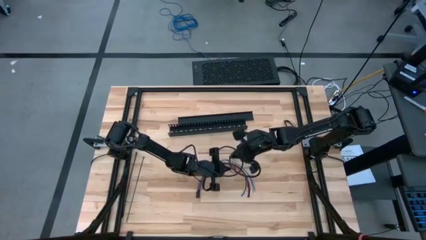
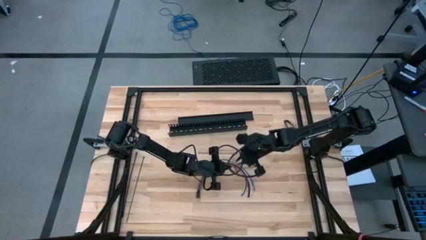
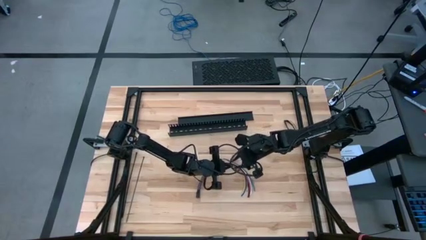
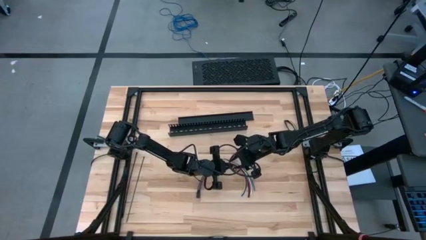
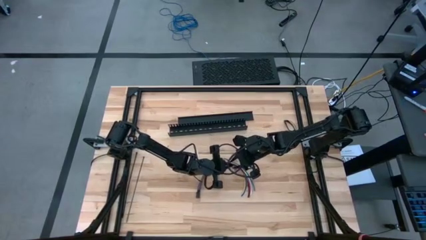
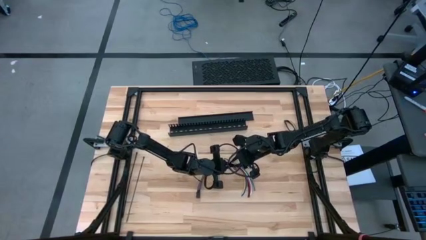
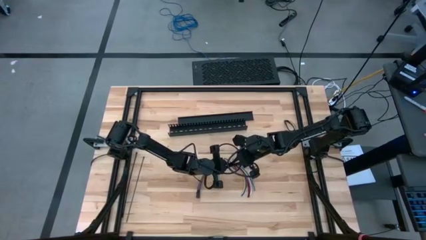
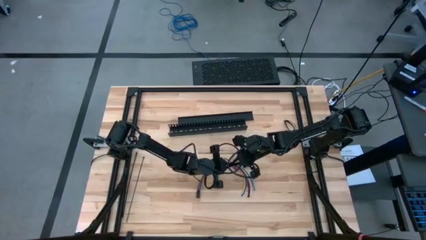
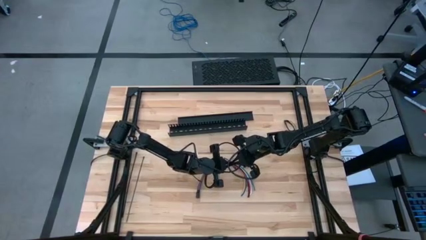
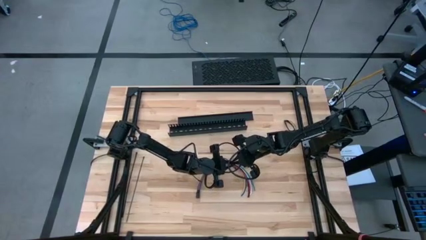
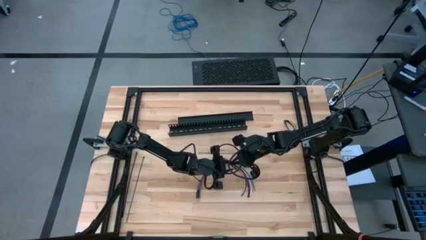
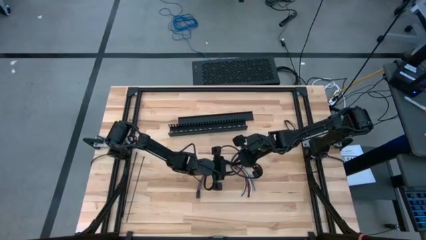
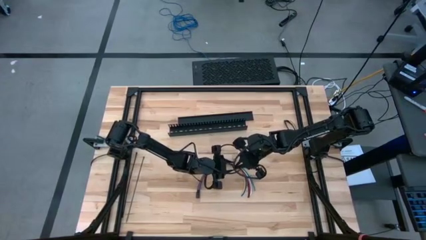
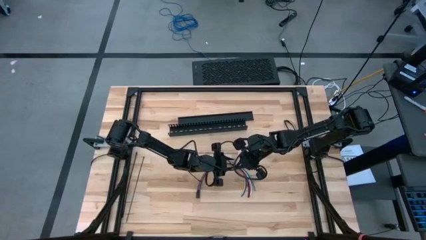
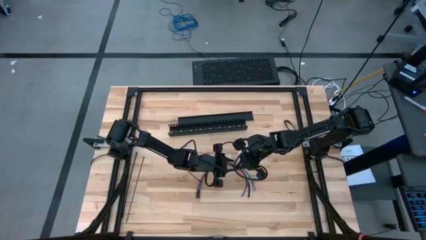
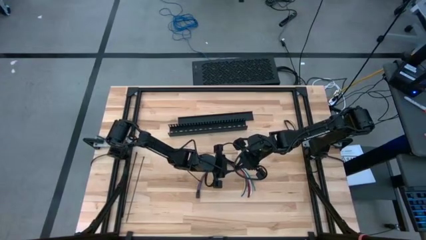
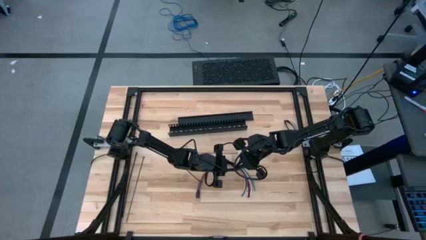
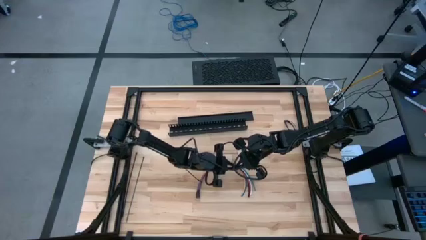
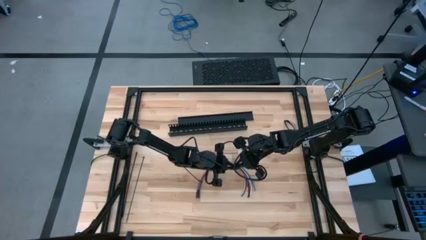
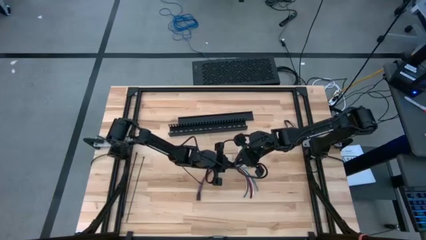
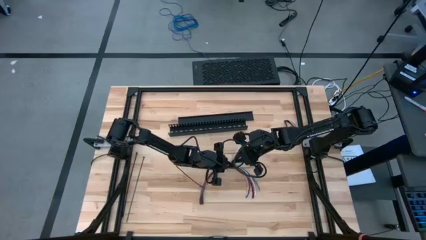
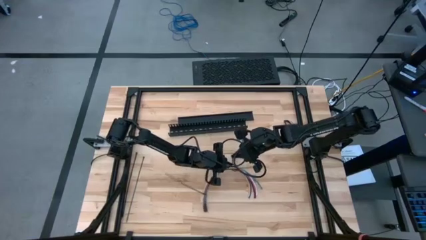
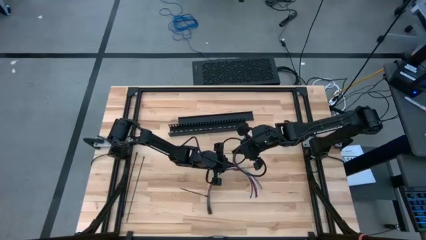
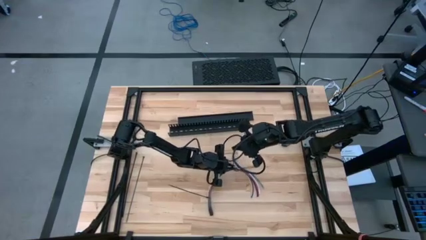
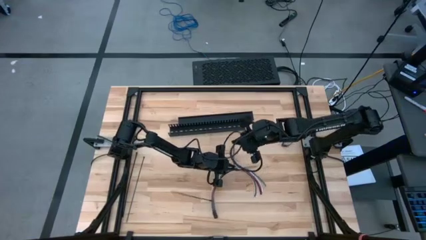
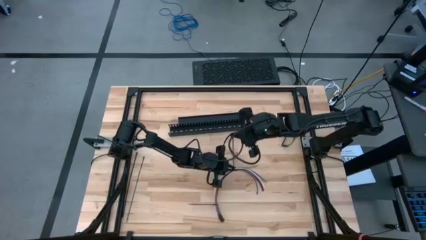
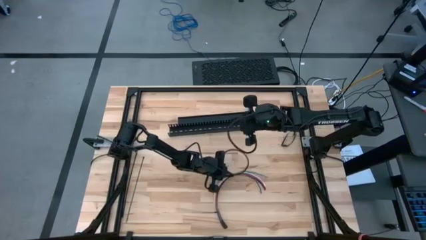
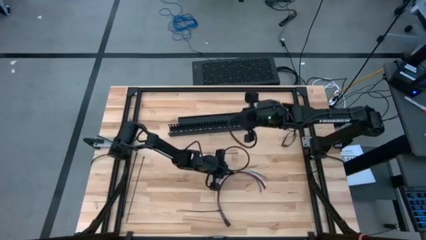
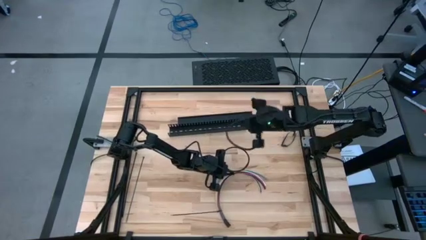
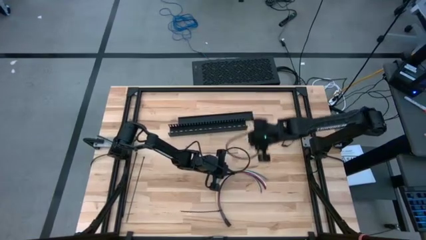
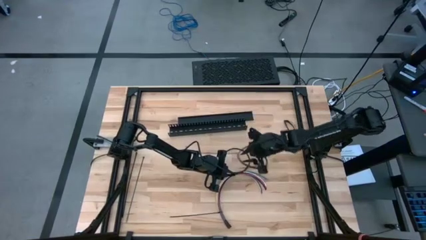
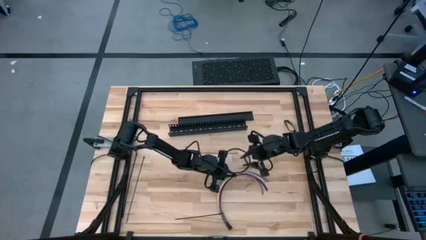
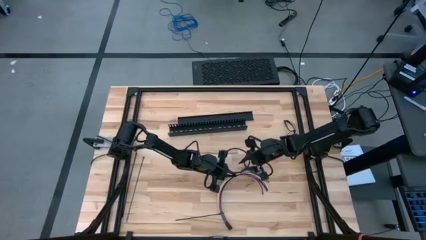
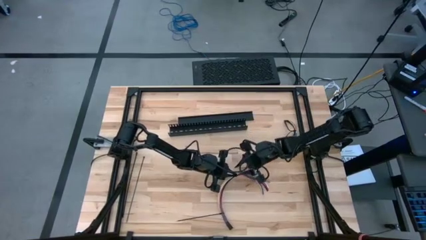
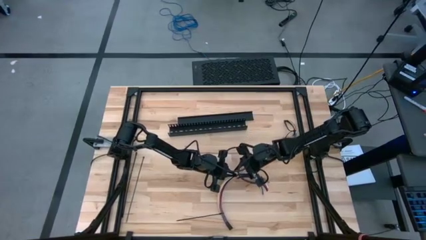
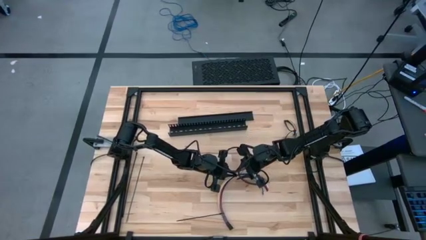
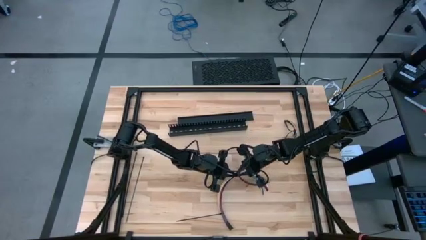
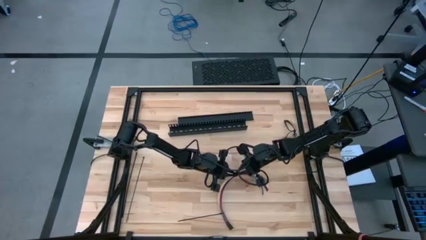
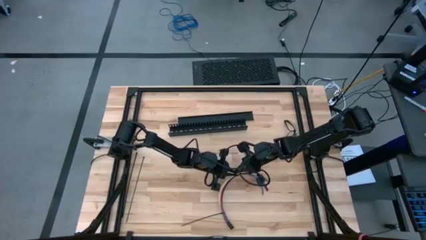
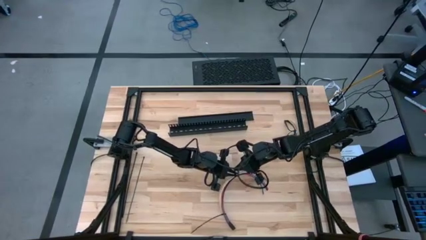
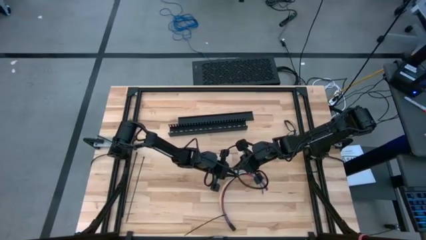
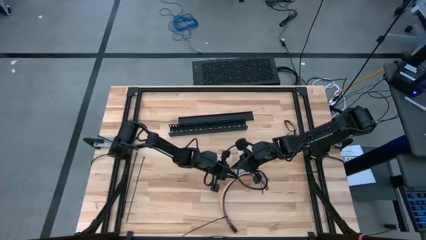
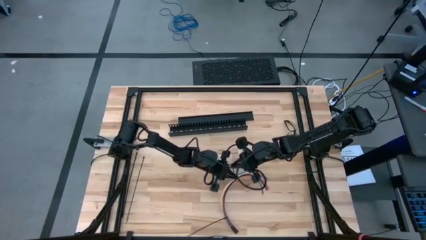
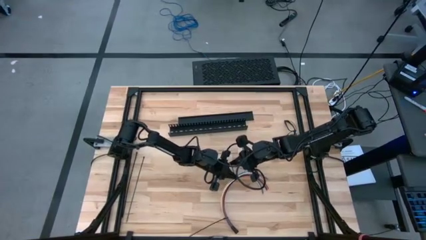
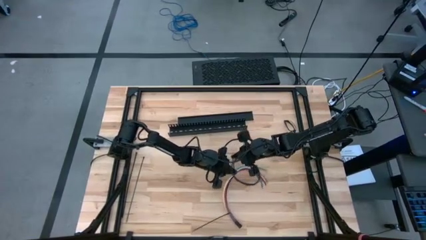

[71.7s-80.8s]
Task: Ziptie cables
Wrap the cable wire using a zip tie
